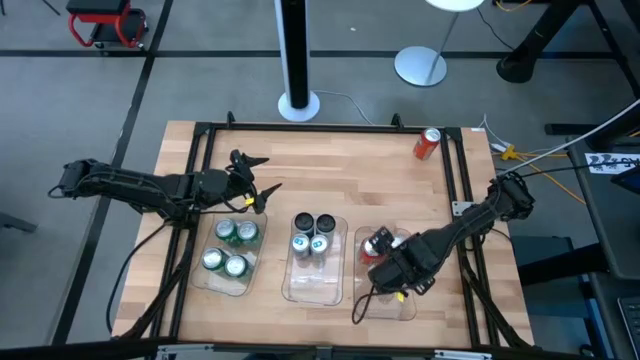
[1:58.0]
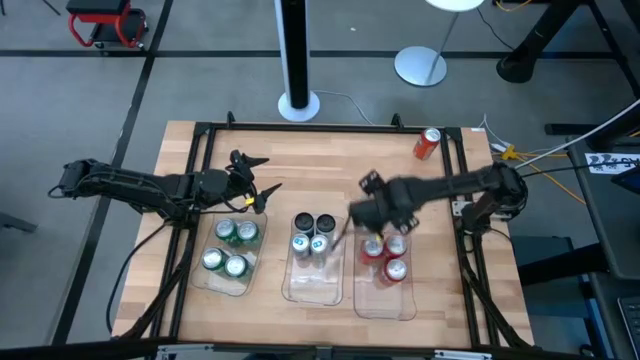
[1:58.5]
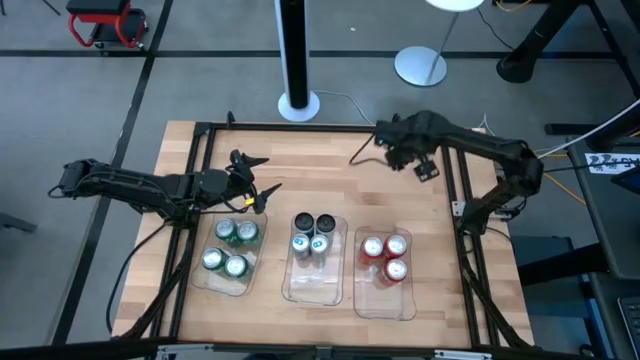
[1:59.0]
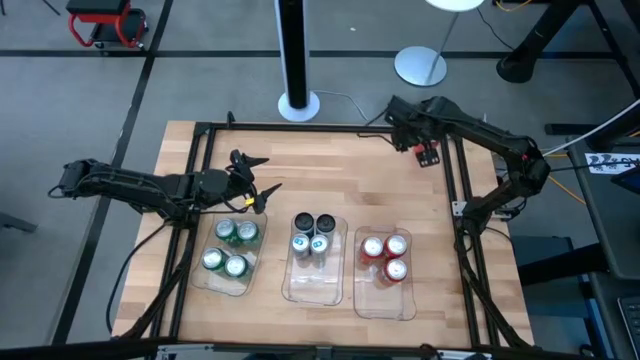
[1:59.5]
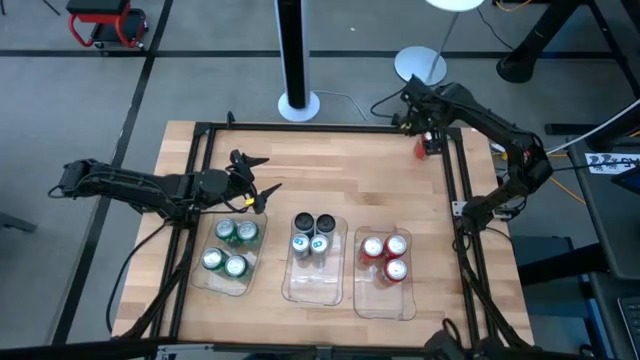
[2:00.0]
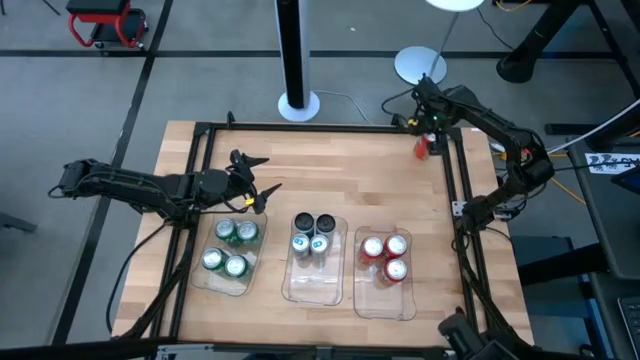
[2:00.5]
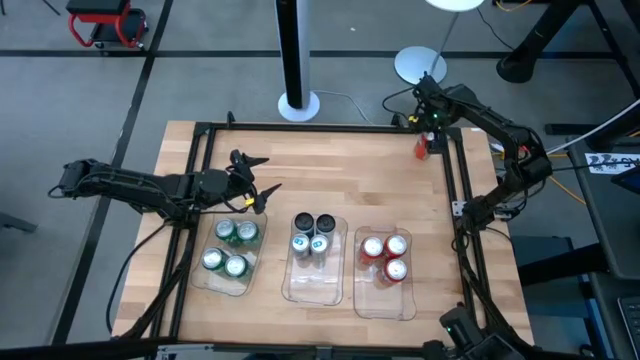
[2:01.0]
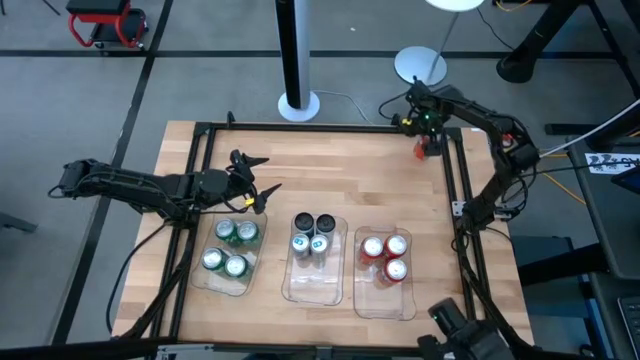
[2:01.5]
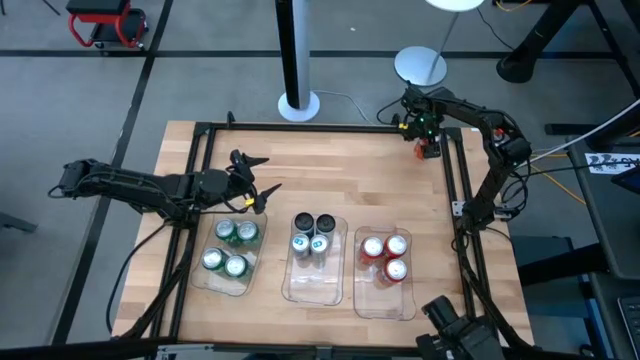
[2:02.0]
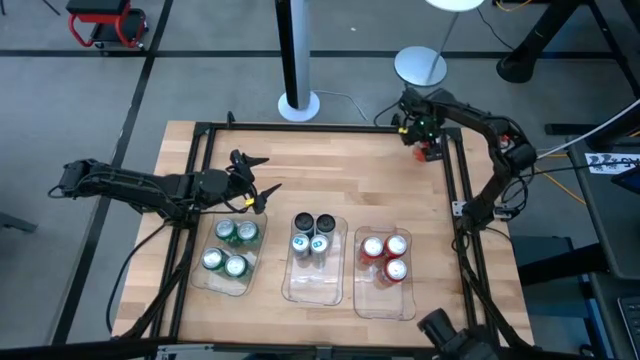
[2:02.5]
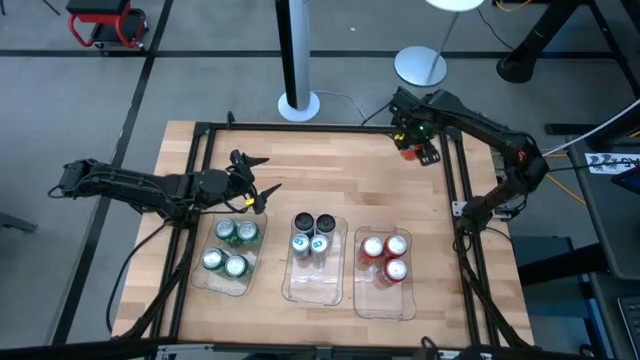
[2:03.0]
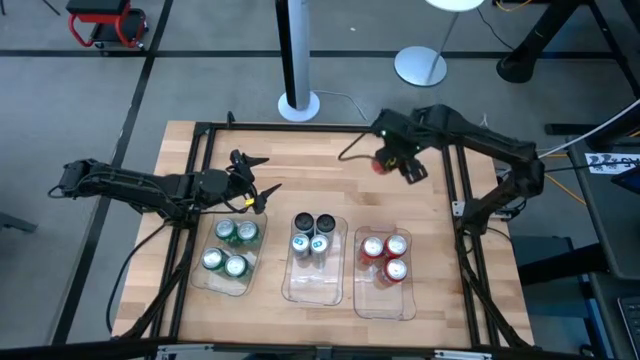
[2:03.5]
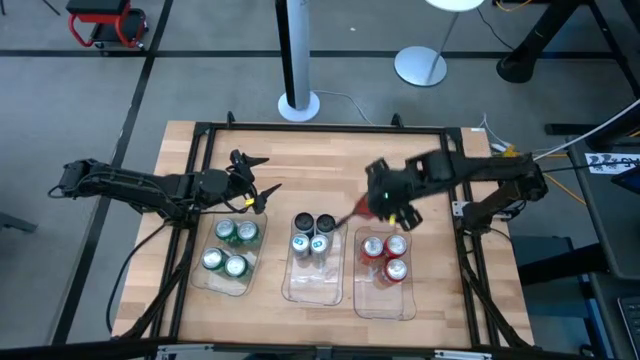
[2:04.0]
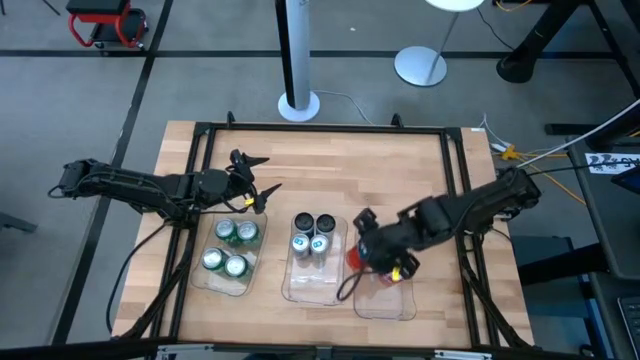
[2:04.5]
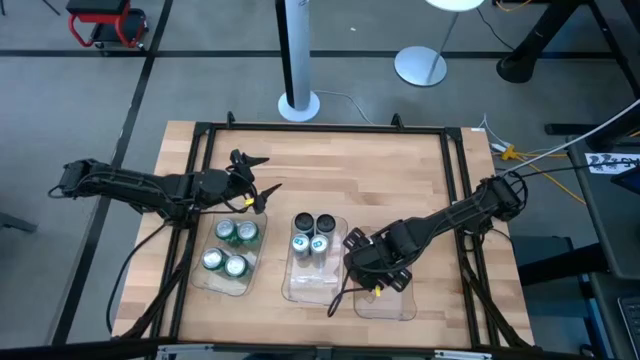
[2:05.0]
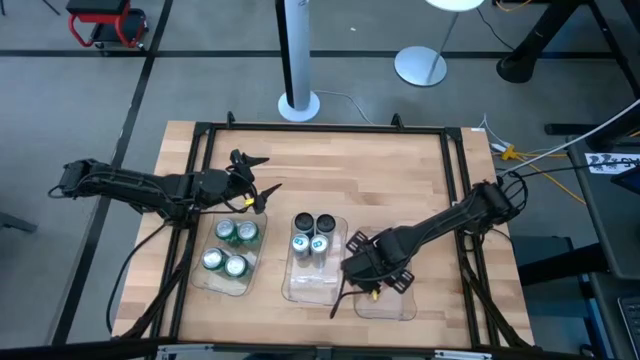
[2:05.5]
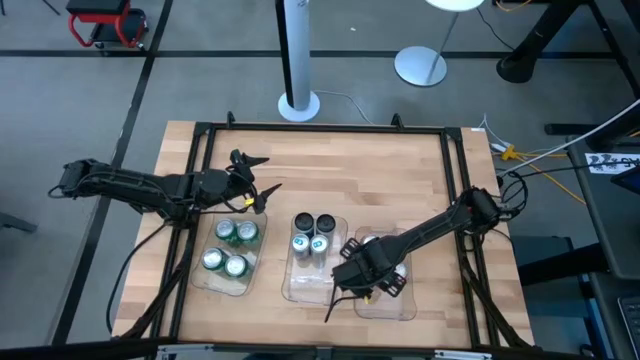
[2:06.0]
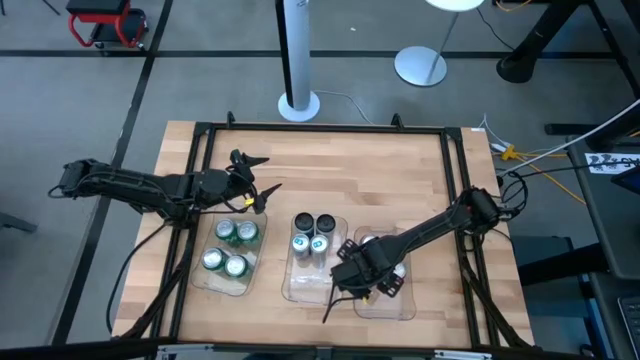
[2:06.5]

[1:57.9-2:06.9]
Task: Sort soda cans
Put the orange soda can into the right transparent bin

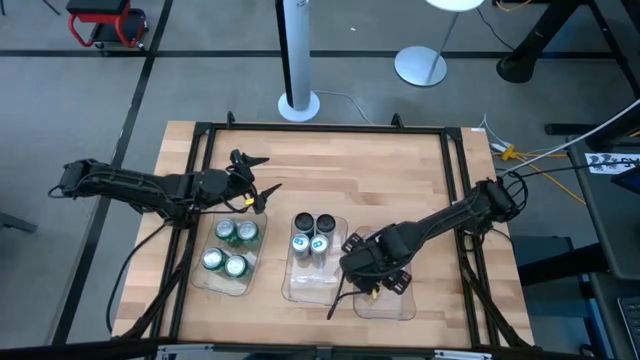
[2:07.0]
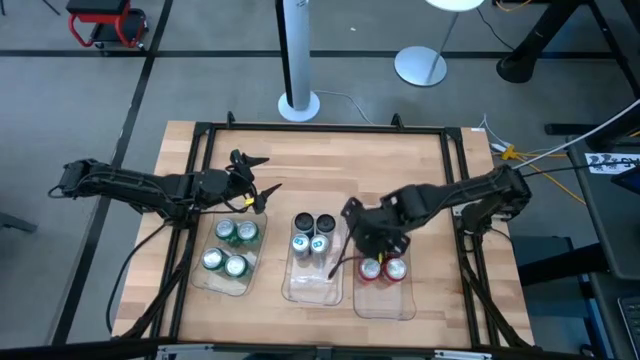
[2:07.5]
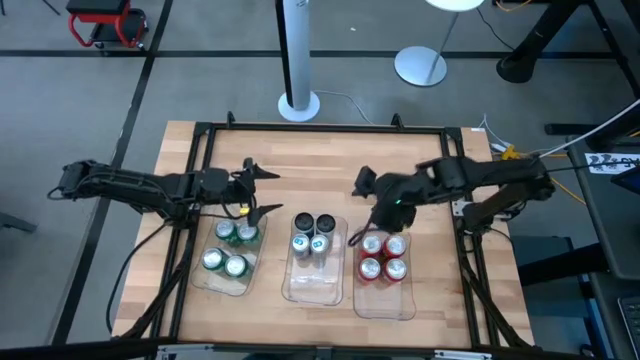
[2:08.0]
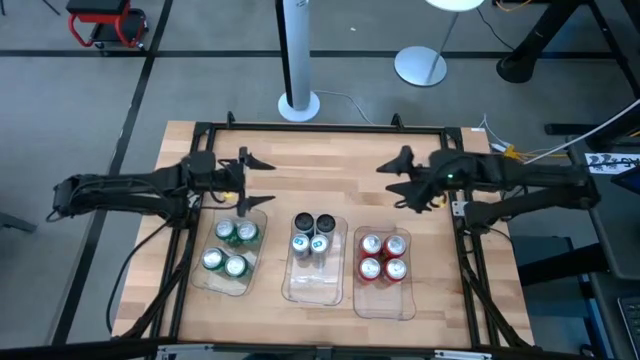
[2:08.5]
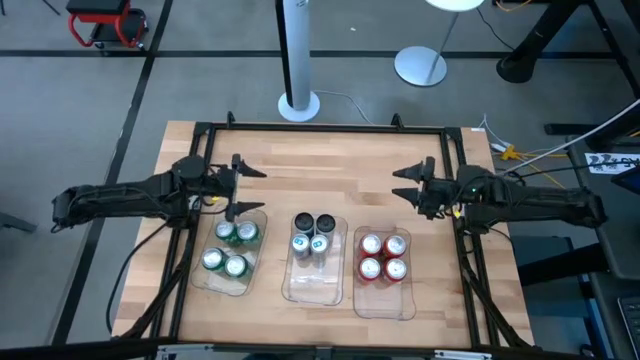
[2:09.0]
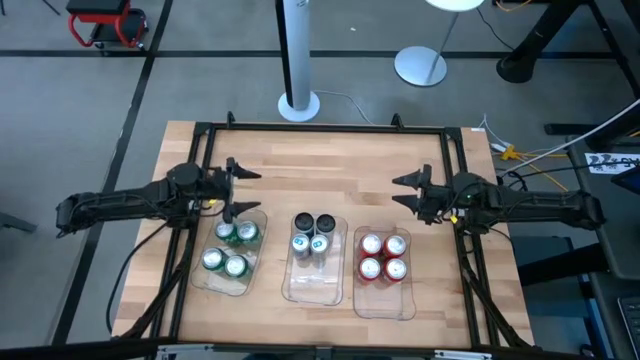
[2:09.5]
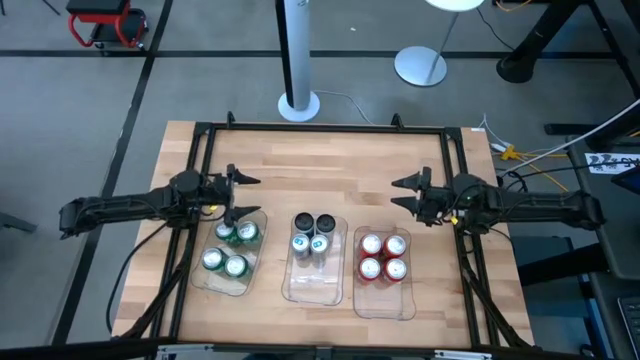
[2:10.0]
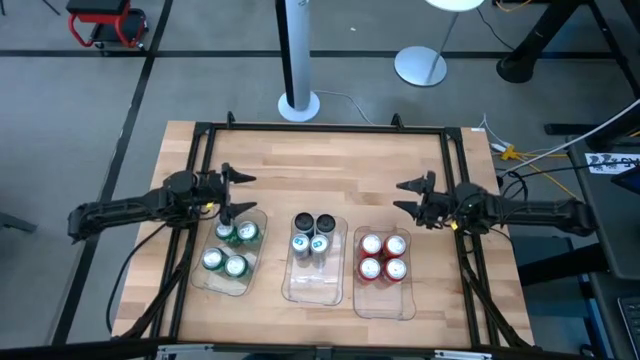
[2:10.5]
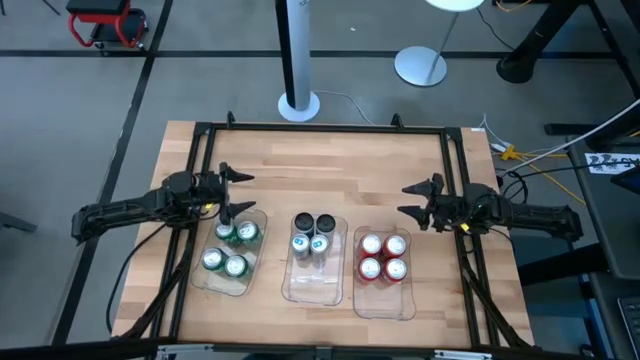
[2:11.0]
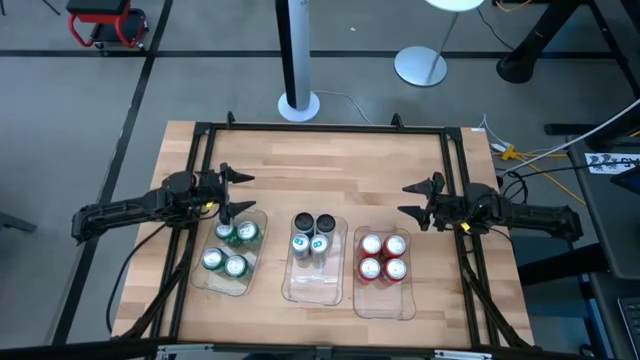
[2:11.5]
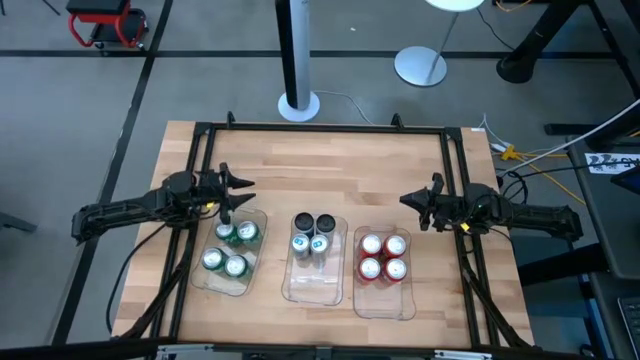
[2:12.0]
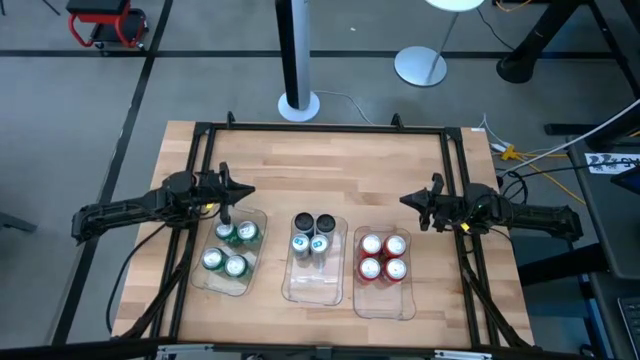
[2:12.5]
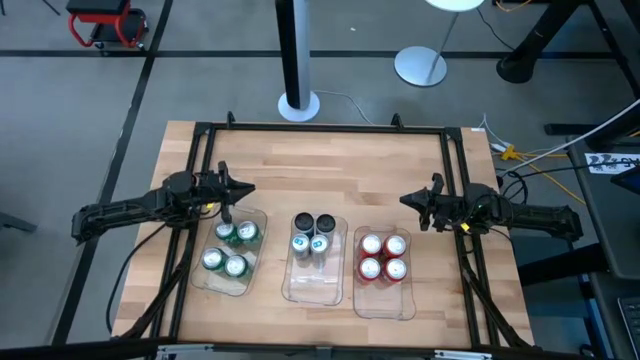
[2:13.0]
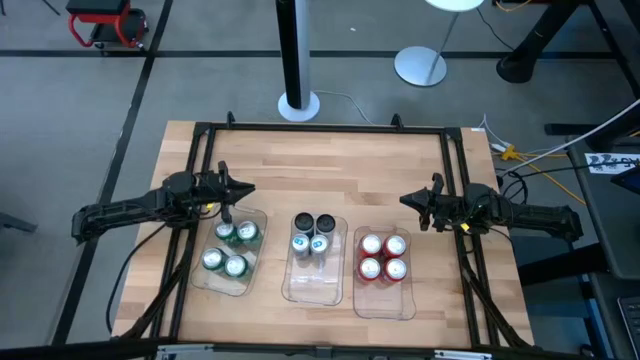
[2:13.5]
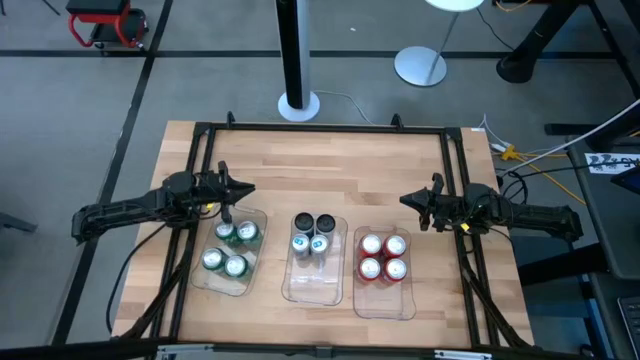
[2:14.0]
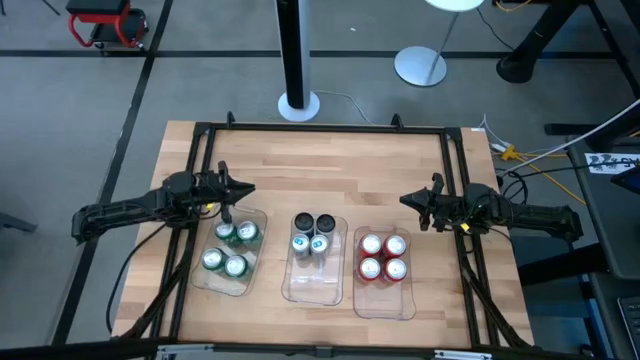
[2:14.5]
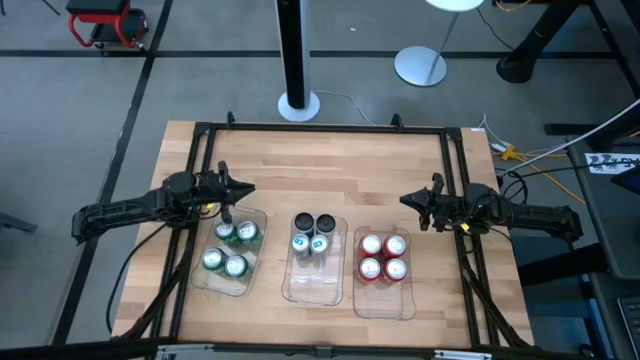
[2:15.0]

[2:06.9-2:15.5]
Return to Home Position

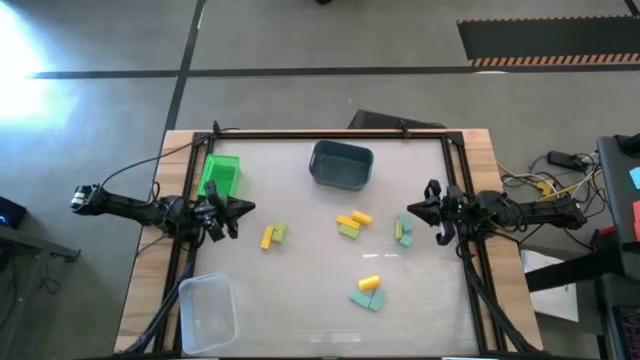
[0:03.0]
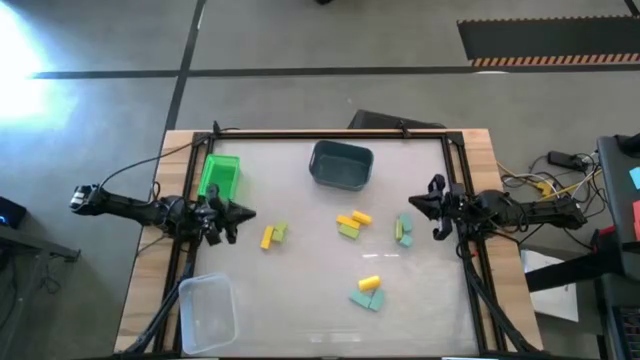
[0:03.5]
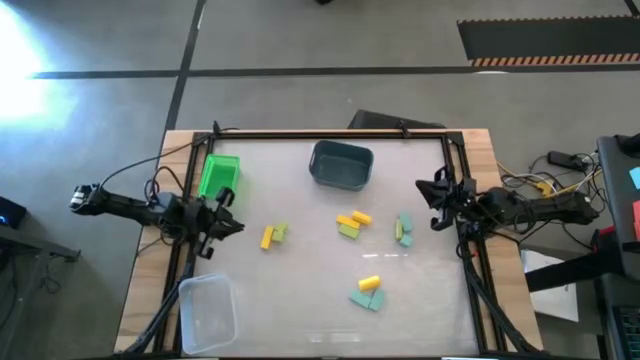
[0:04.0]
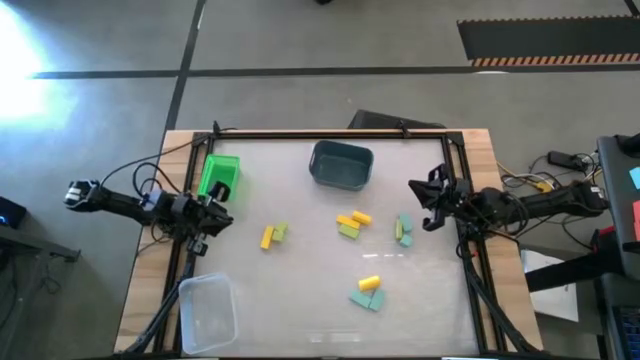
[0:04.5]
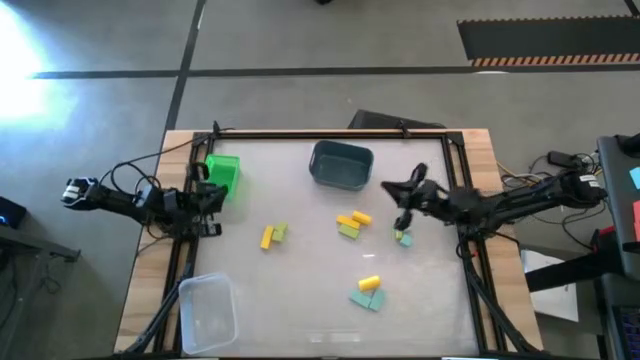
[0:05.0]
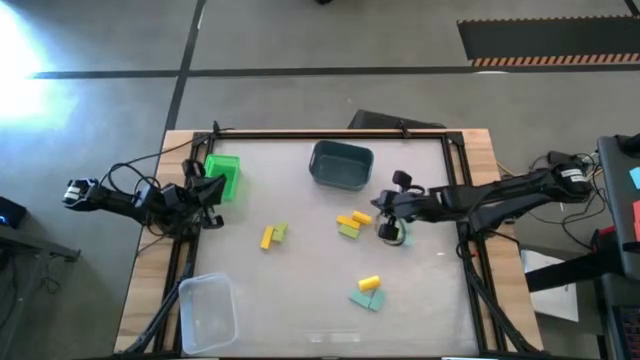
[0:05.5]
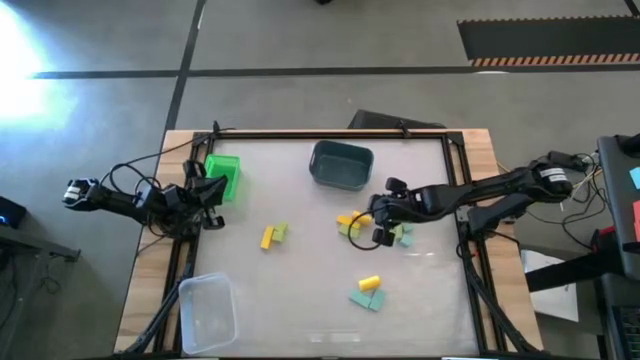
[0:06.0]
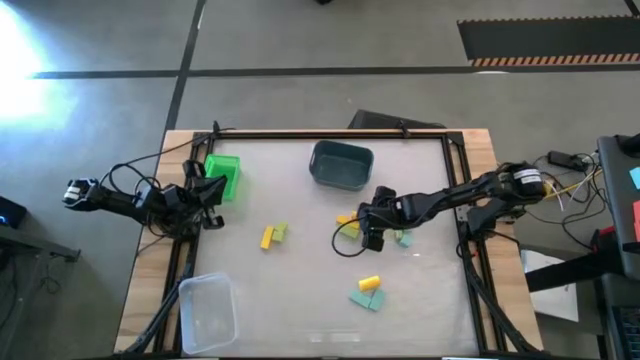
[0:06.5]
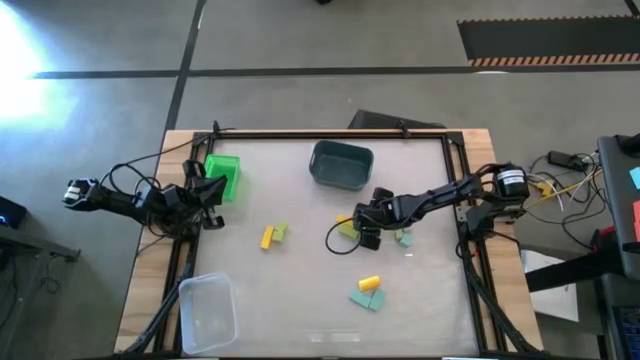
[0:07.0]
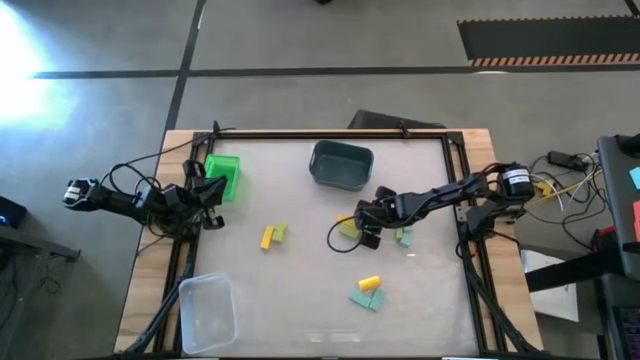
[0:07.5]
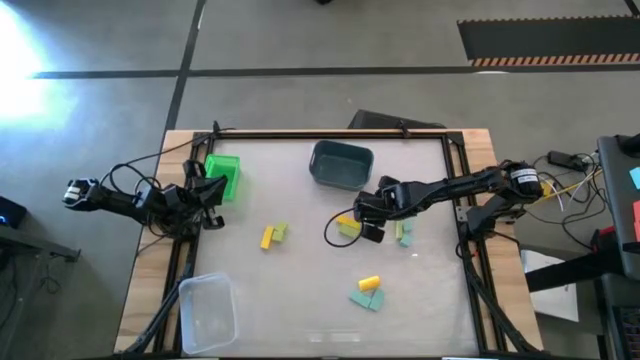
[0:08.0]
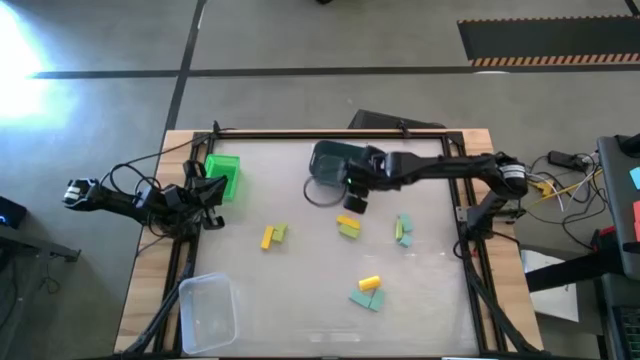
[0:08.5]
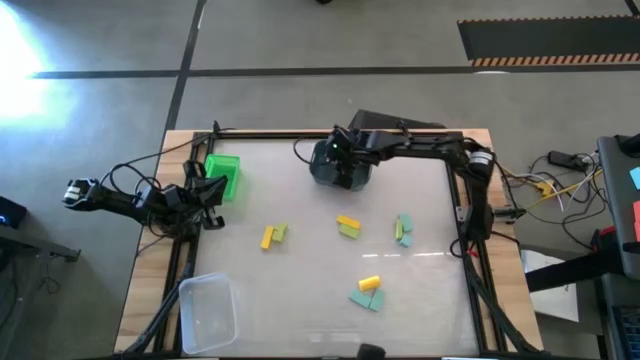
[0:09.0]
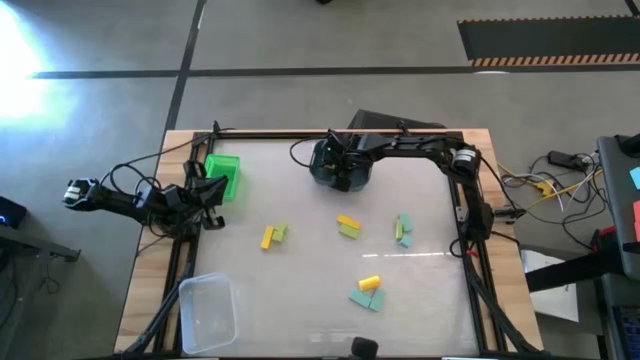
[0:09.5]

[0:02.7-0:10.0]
Task: Sort & place blocks by color
Put the yellow block into the blue bin
